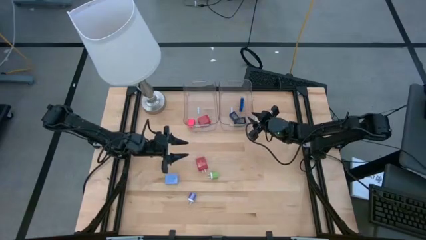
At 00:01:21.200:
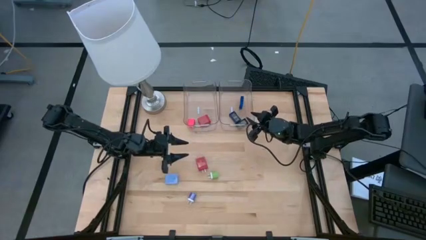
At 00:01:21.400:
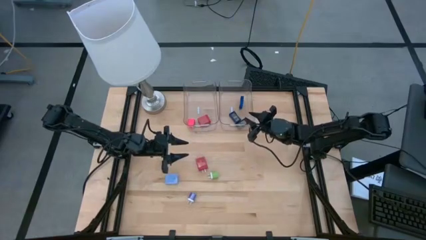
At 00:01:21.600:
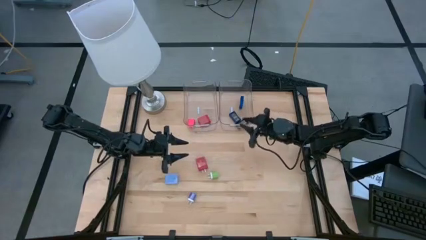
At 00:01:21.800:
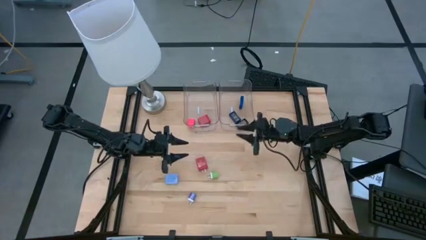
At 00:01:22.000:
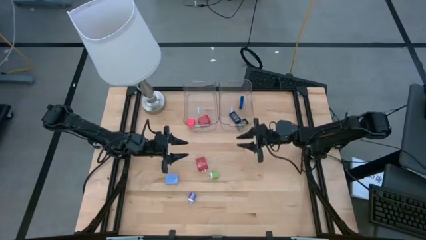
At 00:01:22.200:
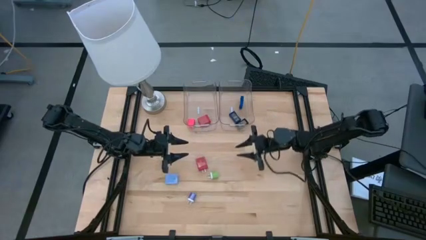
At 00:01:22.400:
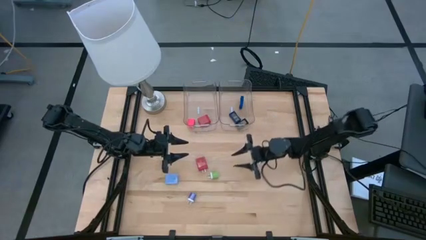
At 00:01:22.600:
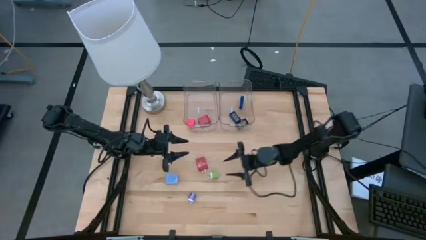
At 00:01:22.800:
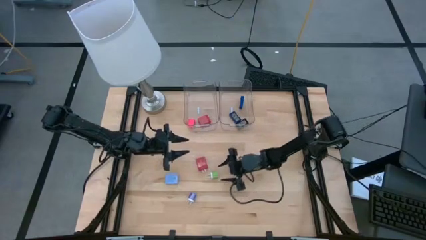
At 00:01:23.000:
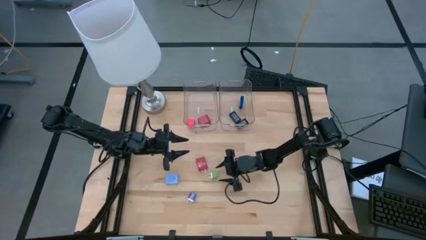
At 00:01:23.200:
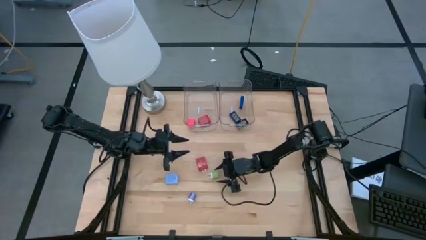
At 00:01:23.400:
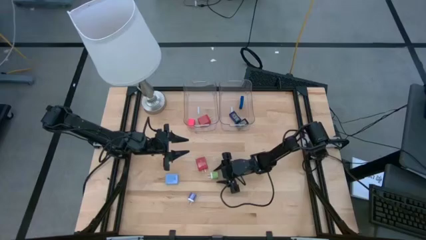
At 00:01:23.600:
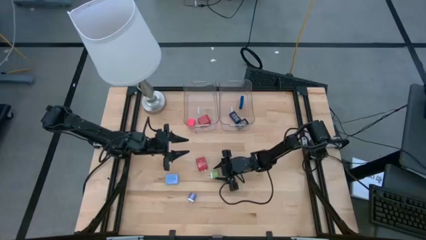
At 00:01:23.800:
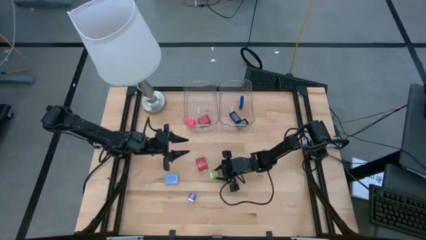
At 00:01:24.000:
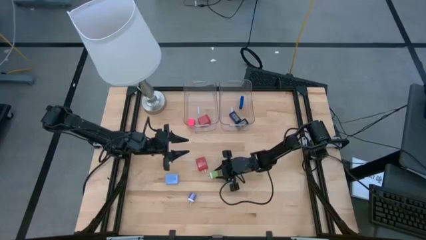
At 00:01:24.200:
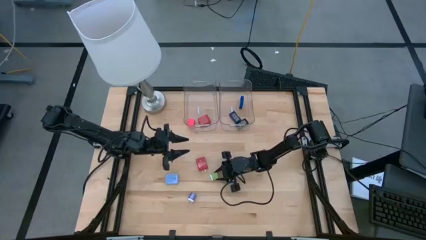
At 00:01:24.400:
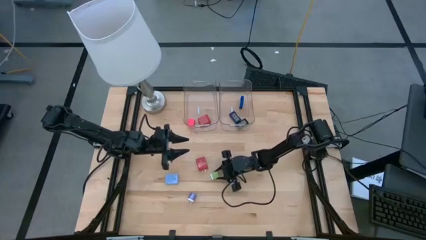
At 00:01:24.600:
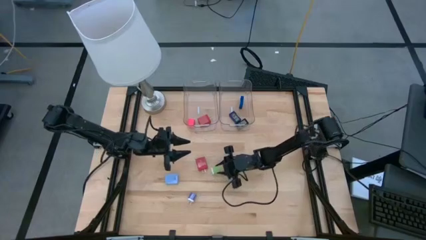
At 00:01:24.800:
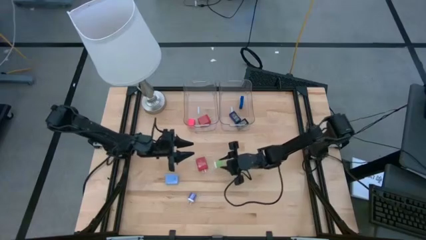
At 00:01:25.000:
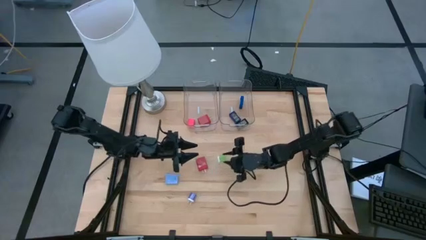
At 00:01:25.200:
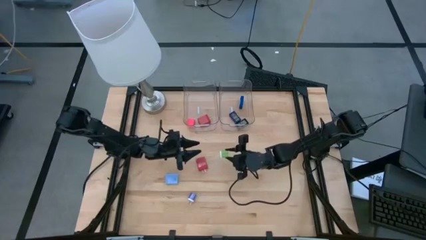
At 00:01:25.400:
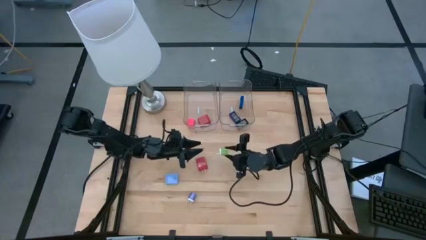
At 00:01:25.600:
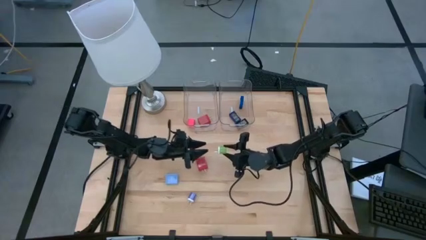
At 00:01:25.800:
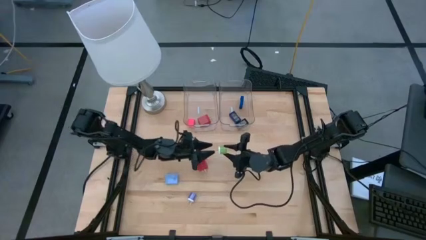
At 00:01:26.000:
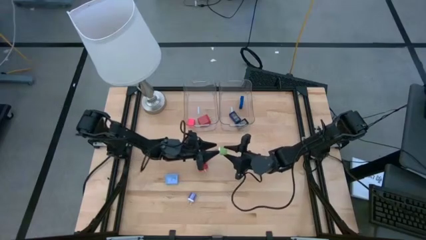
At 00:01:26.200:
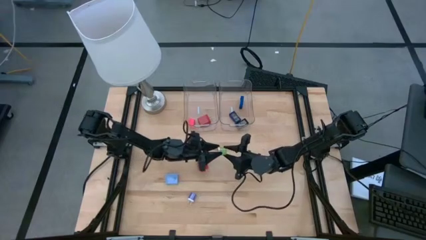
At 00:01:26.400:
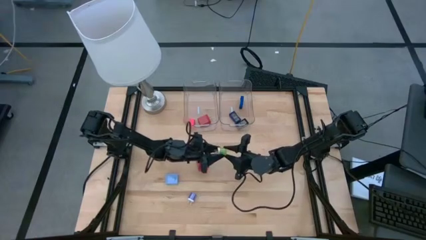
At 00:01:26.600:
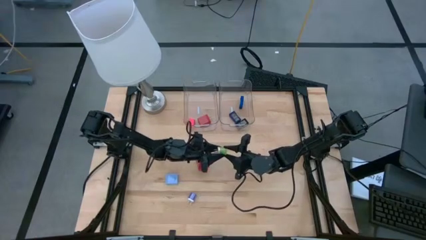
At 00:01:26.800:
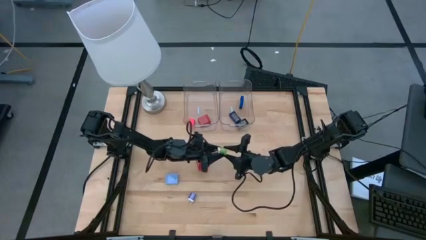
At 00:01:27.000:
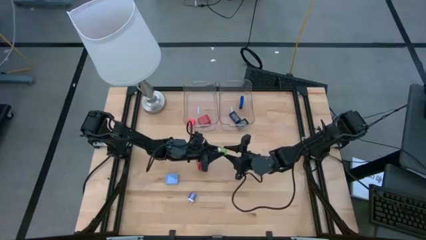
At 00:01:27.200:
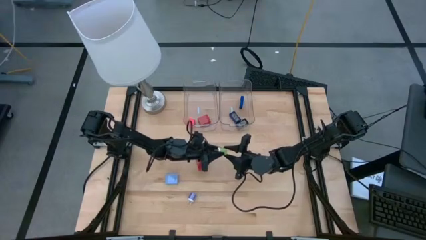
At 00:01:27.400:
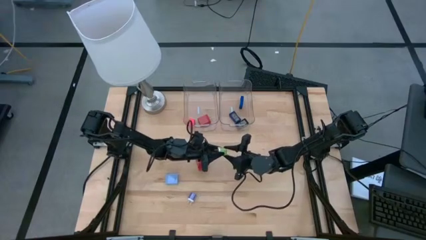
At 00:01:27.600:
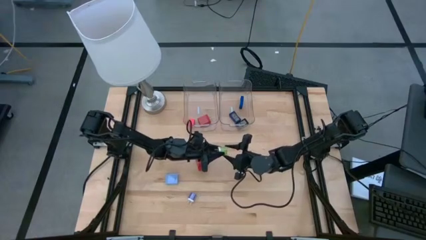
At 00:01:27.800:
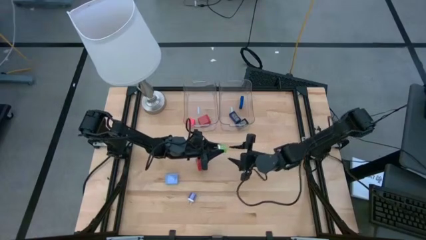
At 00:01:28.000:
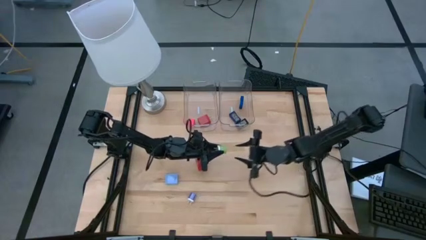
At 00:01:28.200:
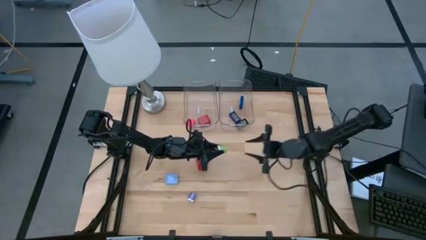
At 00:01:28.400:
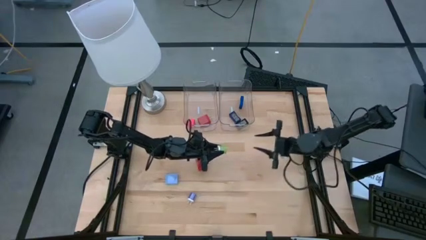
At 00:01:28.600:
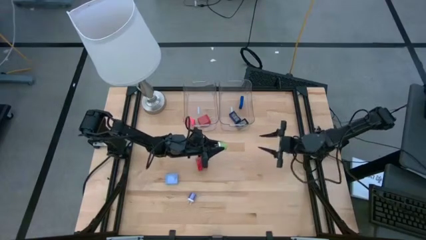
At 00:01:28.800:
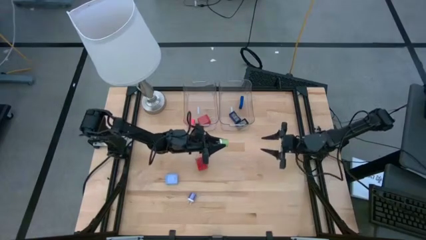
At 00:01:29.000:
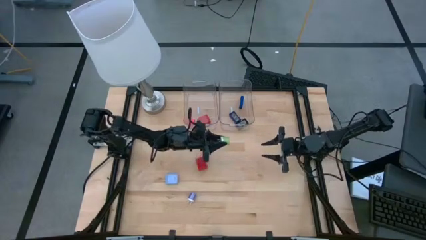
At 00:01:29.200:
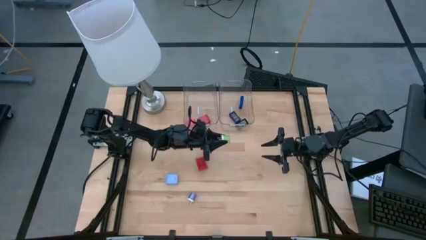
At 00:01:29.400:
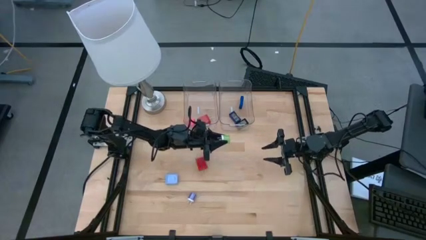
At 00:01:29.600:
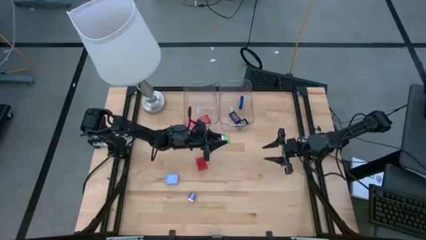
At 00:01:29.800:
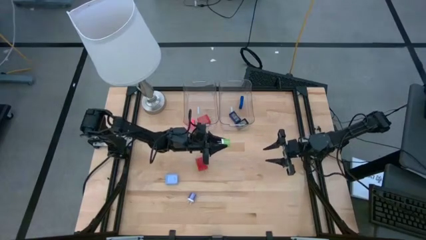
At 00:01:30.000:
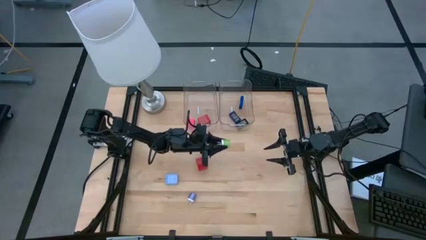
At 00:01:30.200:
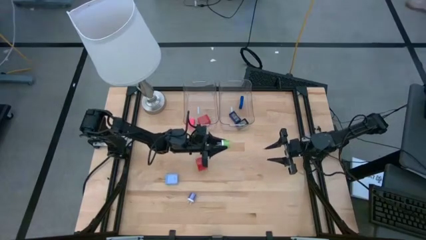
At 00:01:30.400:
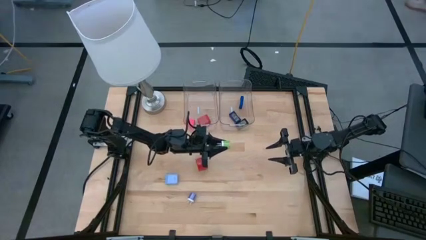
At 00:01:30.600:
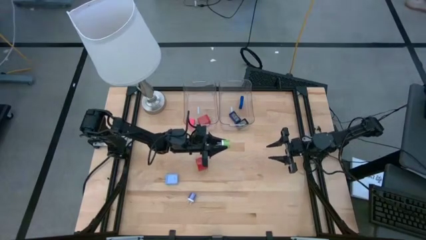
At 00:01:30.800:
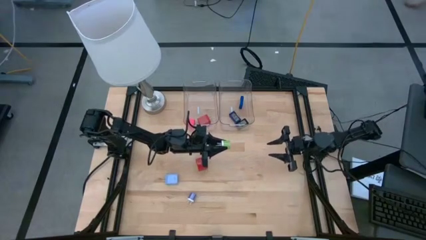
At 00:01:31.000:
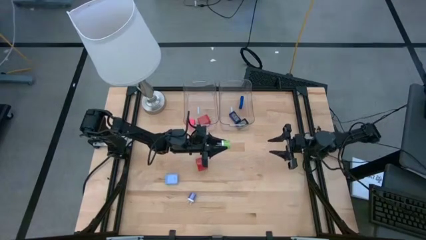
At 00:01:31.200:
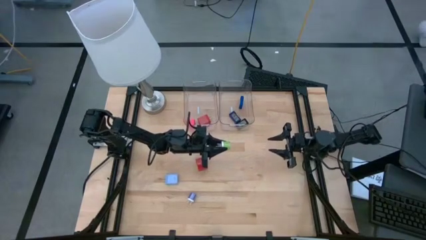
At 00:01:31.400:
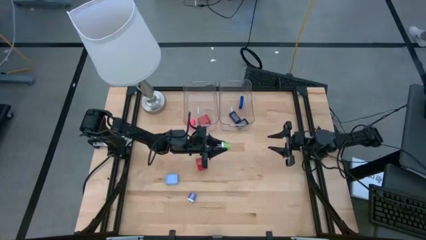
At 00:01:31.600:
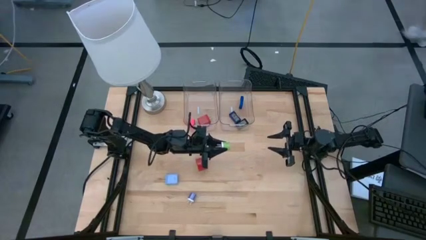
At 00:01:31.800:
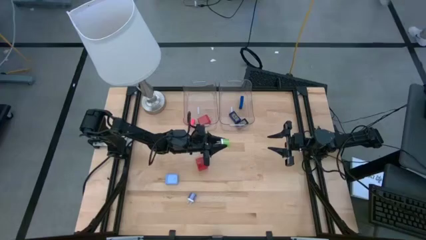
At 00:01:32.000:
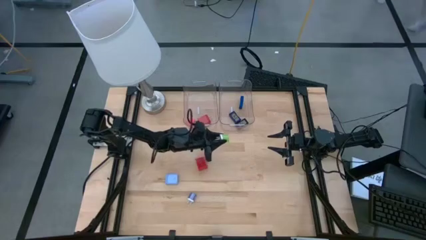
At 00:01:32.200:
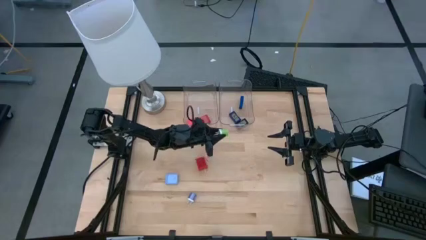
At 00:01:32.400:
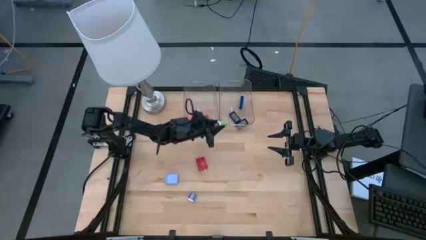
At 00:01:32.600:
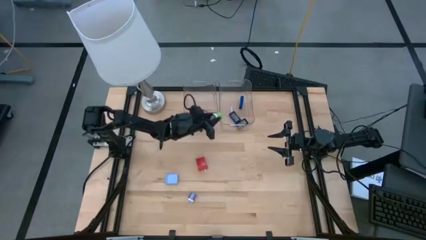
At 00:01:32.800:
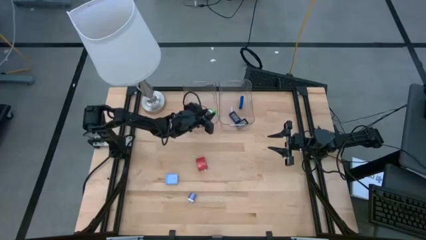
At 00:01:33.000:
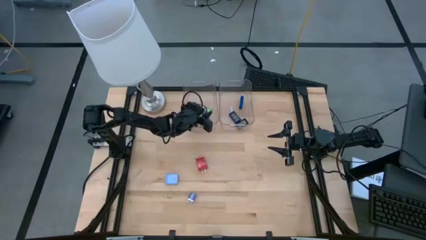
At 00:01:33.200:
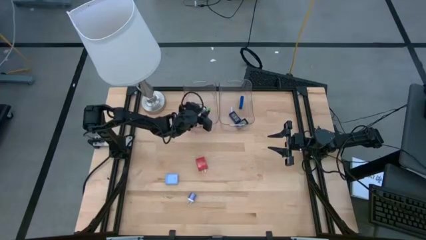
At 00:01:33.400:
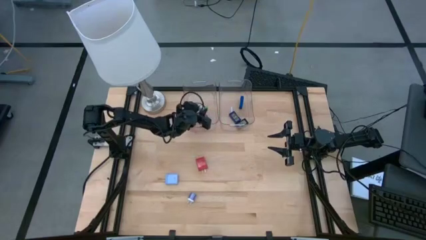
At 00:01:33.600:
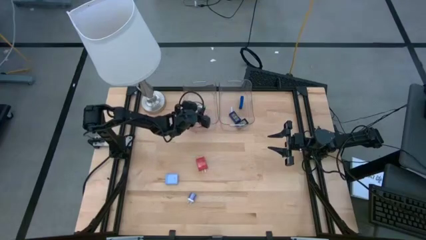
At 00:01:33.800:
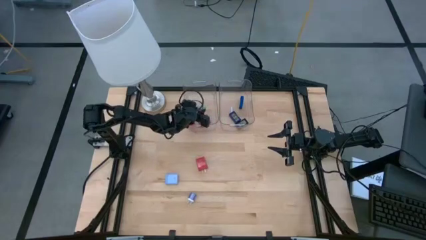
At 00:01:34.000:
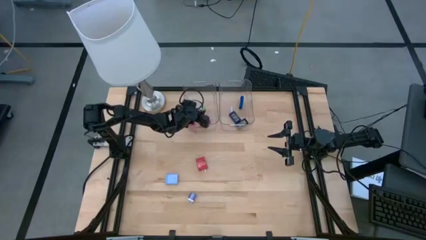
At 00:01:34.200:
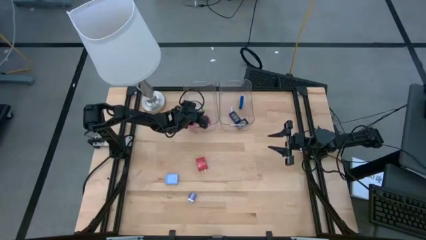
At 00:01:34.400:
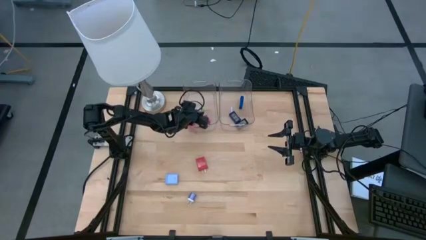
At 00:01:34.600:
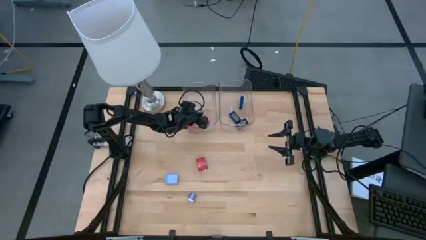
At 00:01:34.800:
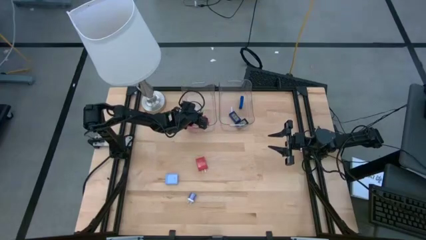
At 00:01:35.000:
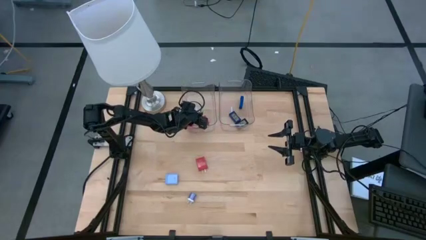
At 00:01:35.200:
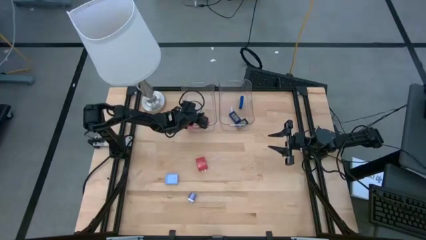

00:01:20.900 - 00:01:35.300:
Task: Pick & Place Office items
Put the green charger adapter into the left transparent bin
